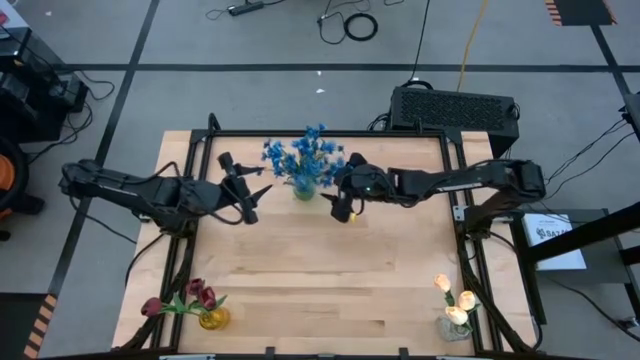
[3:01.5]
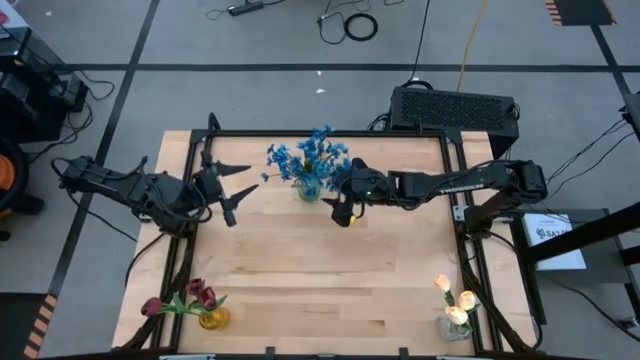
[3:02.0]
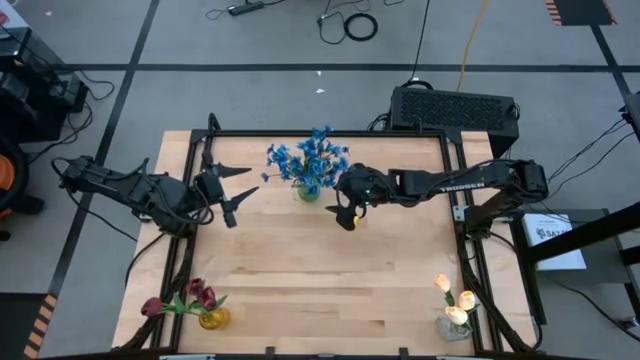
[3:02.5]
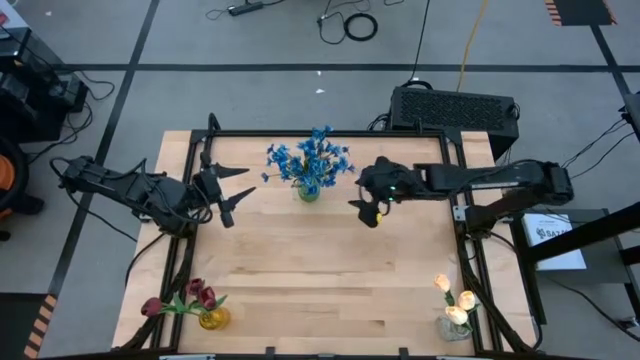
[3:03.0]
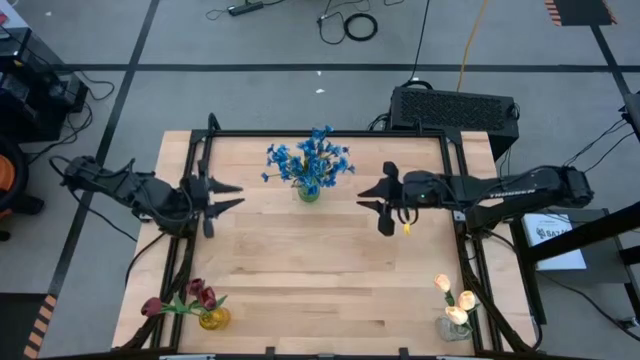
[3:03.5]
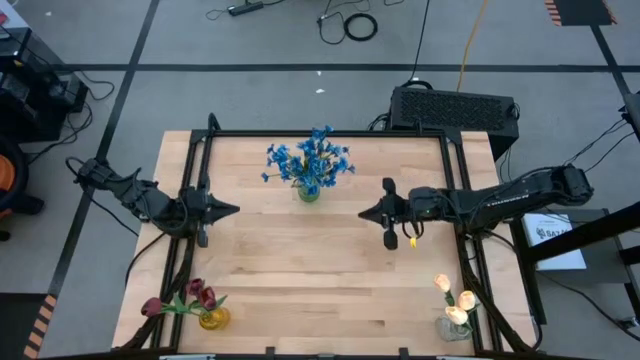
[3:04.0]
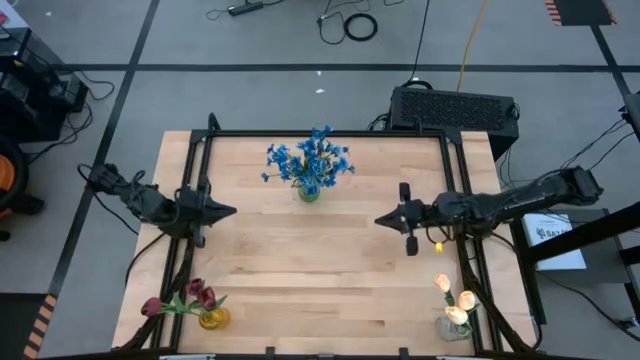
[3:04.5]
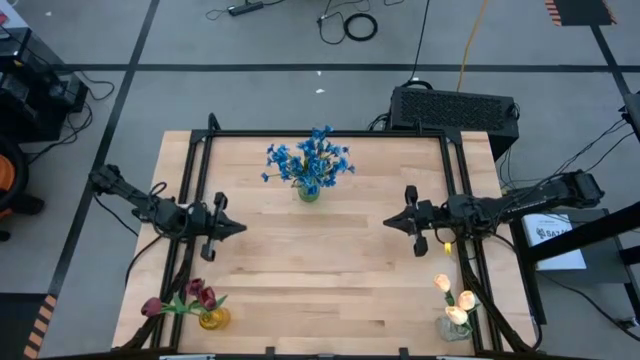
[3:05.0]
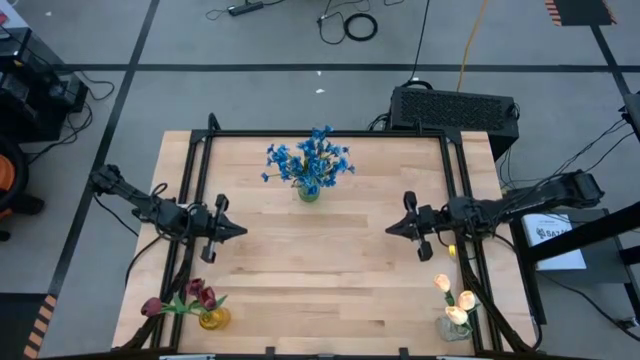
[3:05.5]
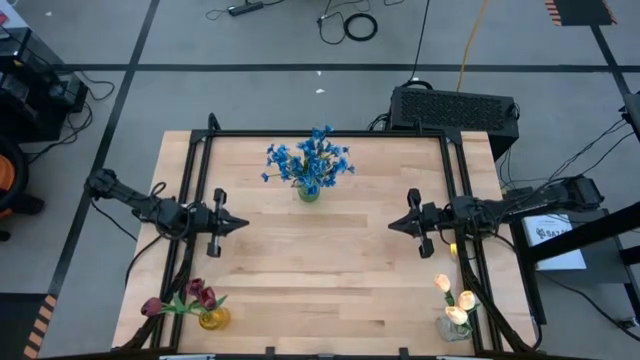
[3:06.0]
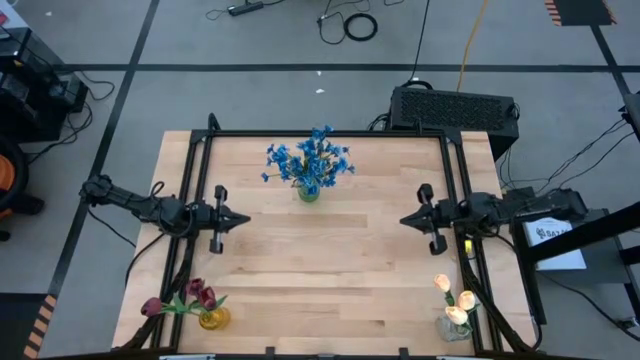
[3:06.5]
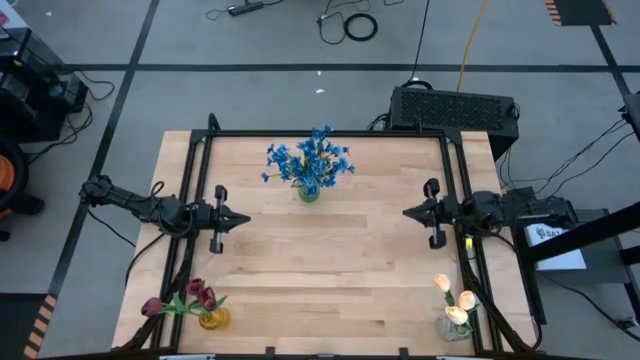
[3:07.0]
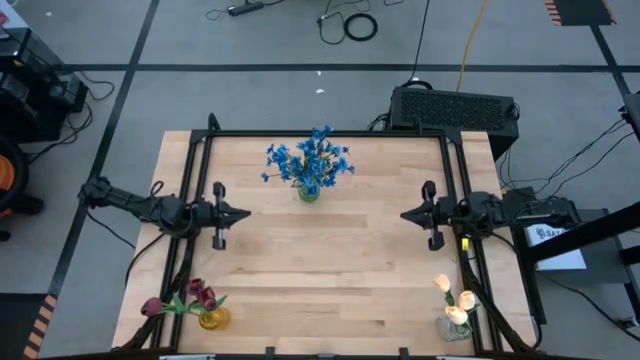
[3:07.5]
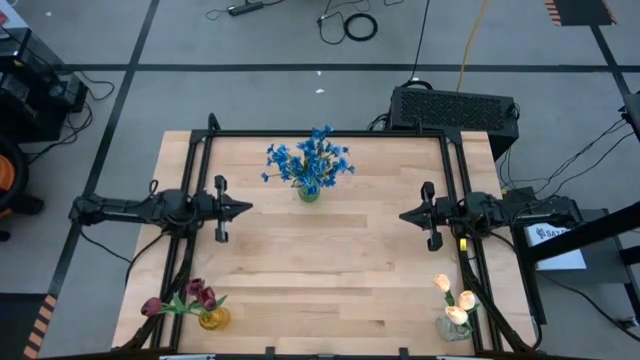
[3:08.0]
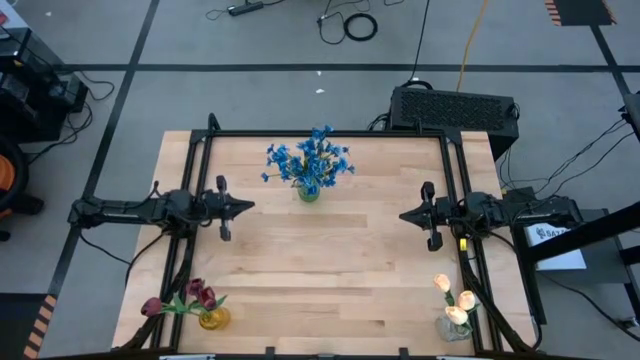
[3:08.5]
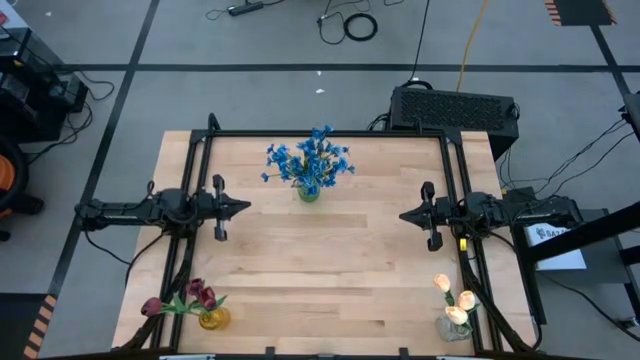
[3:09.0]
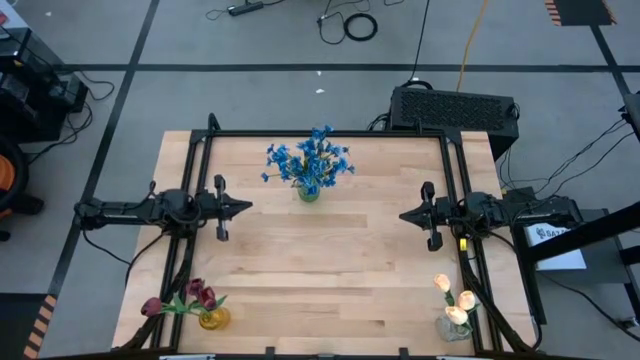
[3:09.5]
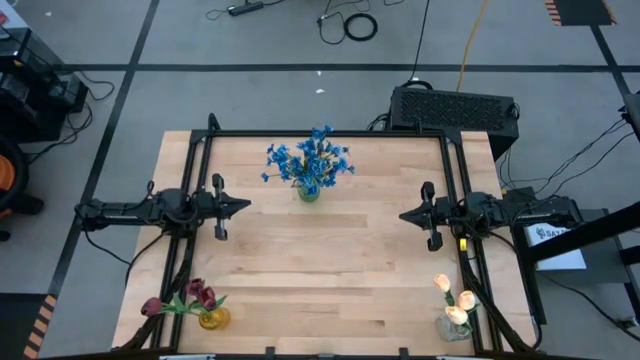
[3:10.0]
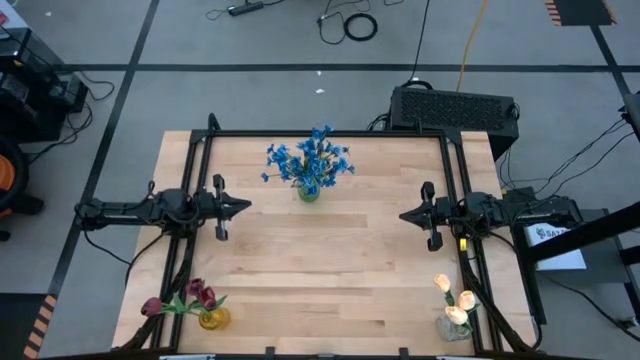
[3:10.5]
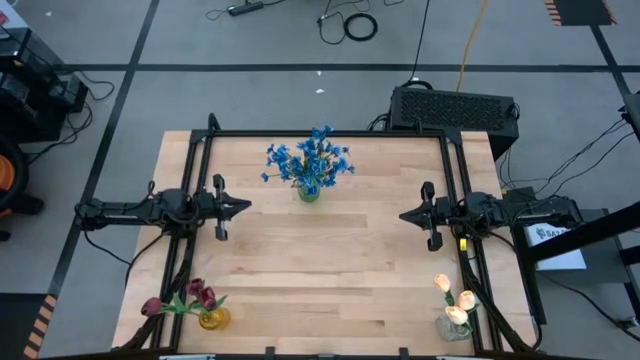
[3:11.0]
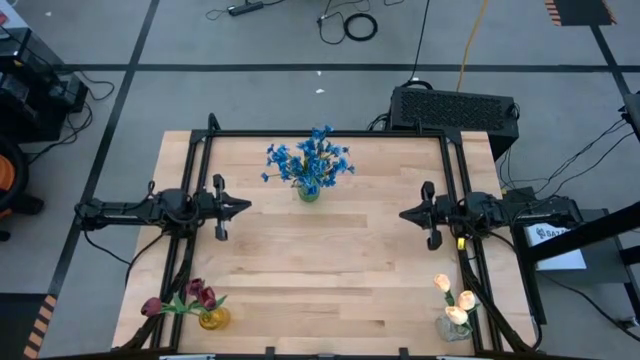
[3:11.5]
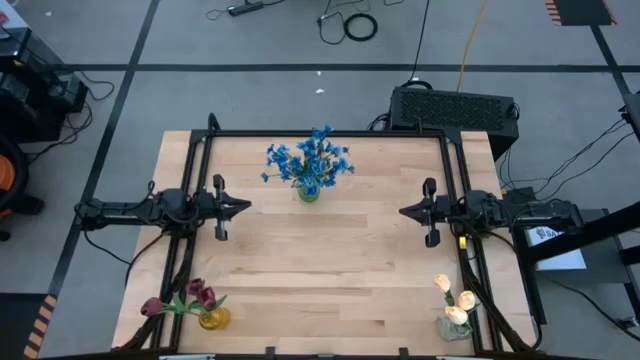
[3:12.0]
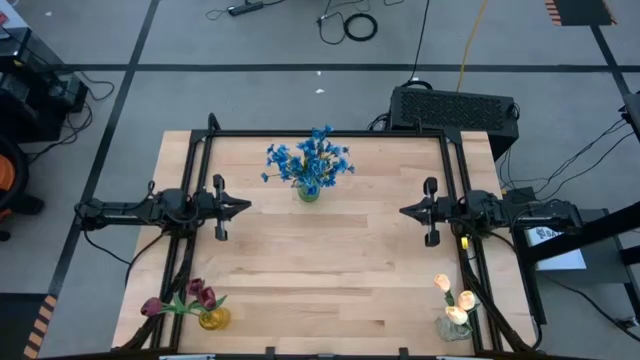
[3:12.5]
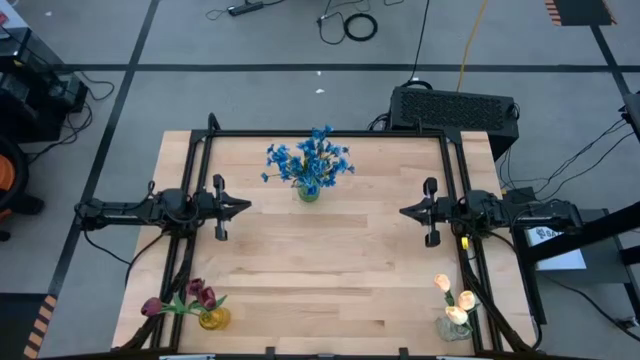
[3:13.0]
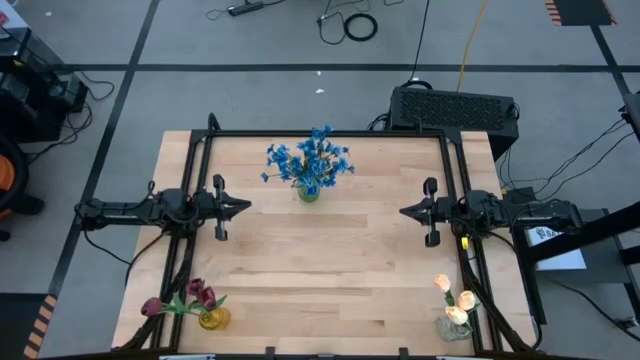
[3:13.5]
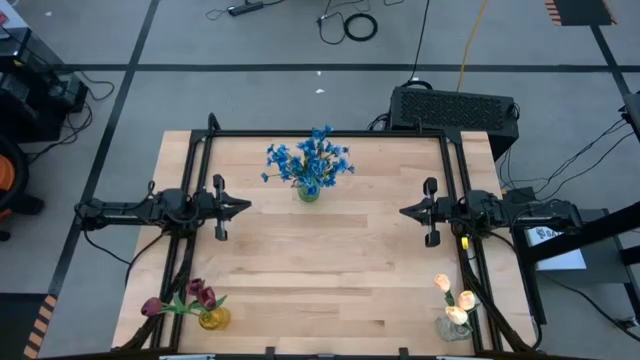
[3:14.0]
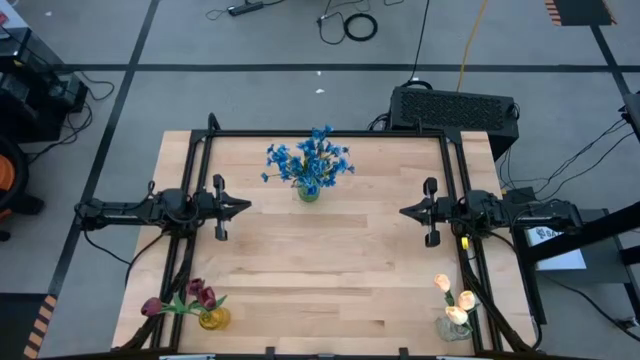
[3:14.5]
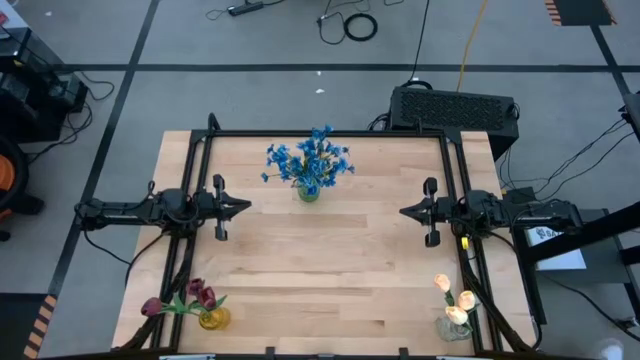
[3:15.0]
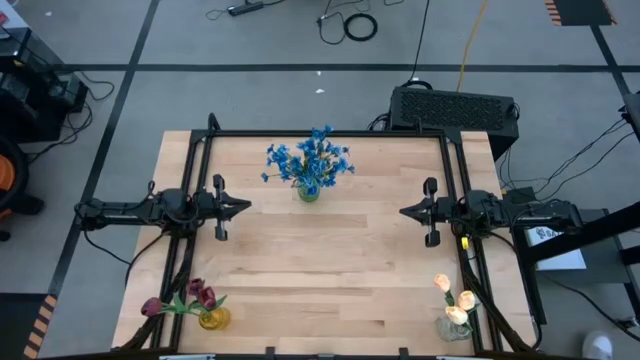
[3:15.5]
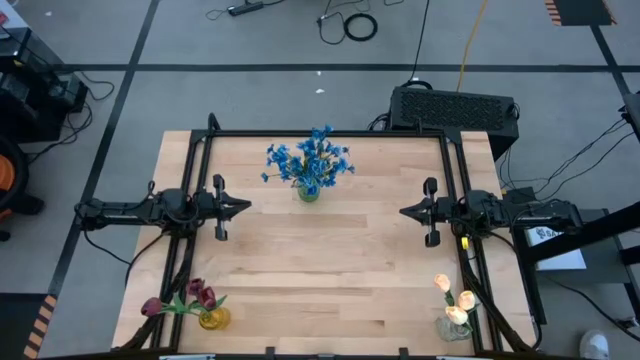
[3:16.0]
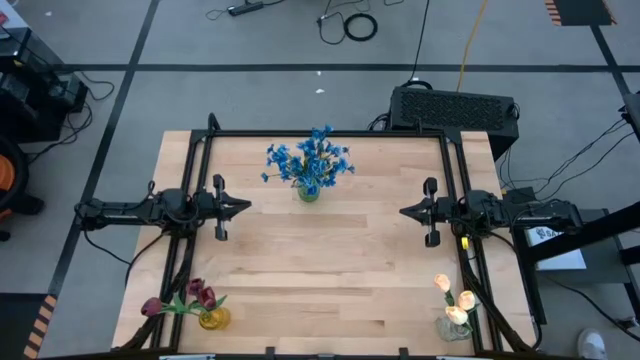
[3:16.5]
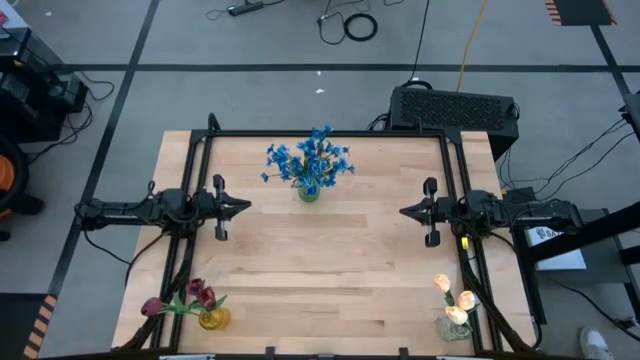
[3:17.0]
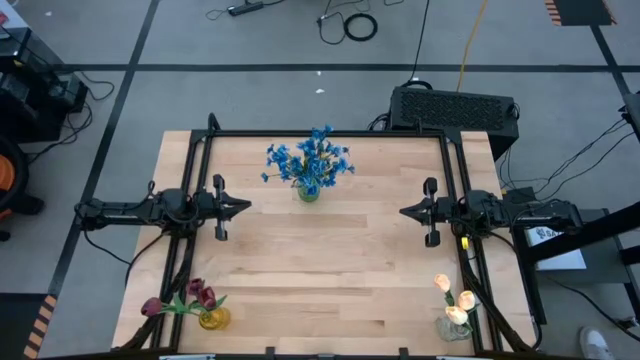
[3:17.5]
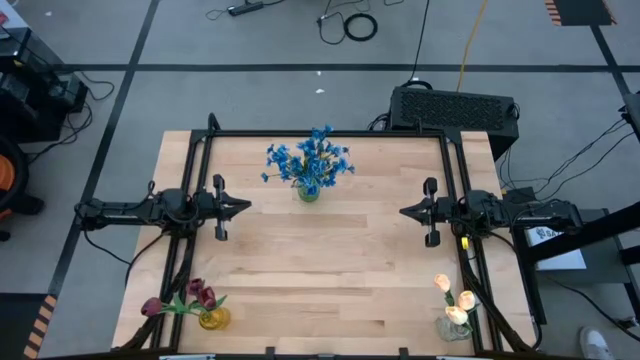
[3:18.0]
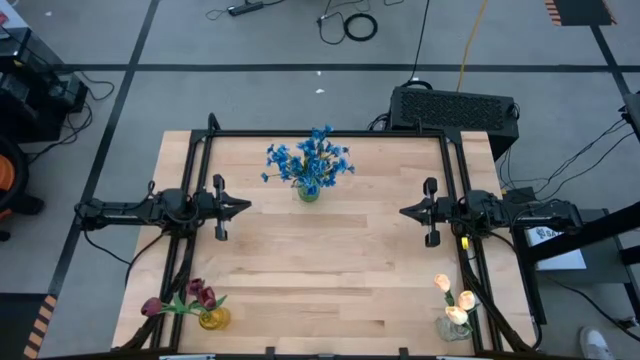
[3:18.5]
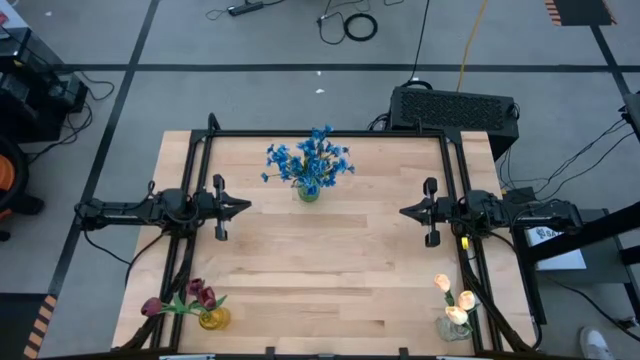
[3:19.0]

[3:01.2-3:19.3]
Task: Sort flowers into vase by color
Return to Home Position

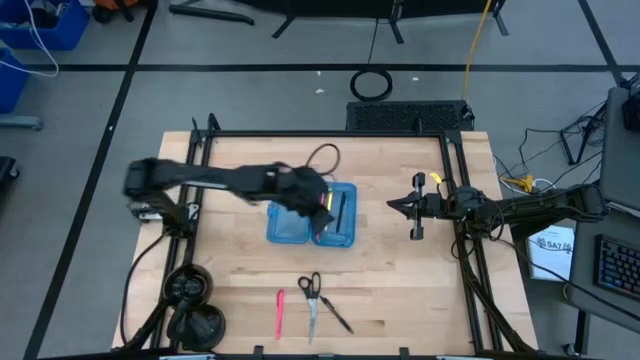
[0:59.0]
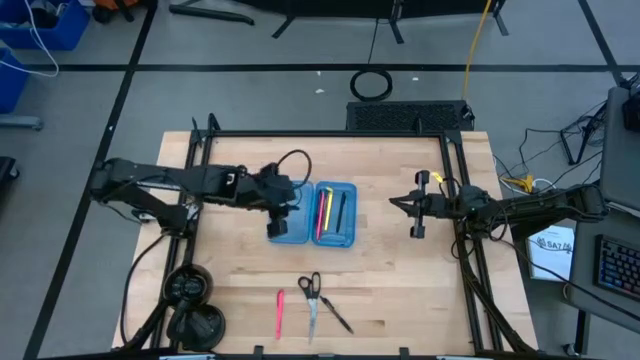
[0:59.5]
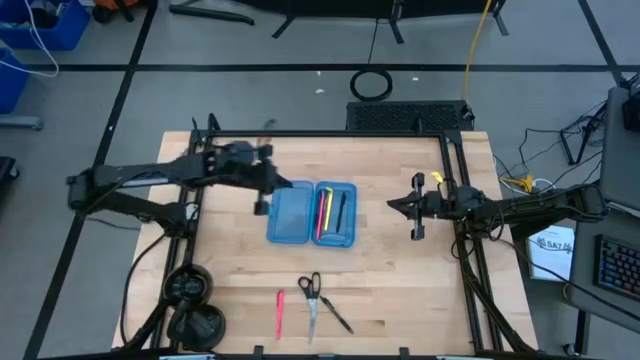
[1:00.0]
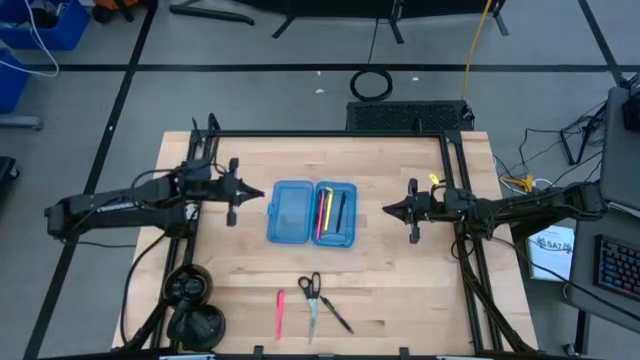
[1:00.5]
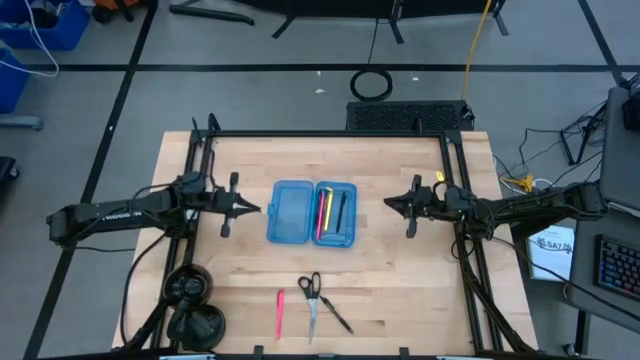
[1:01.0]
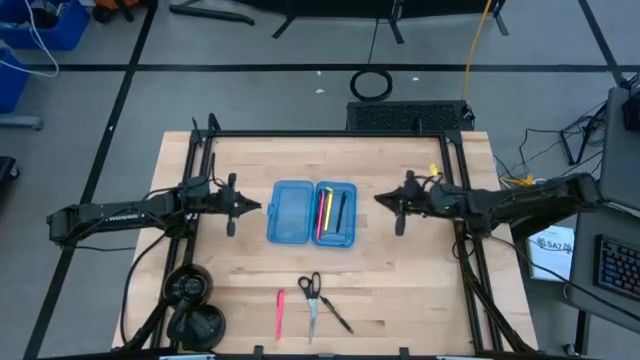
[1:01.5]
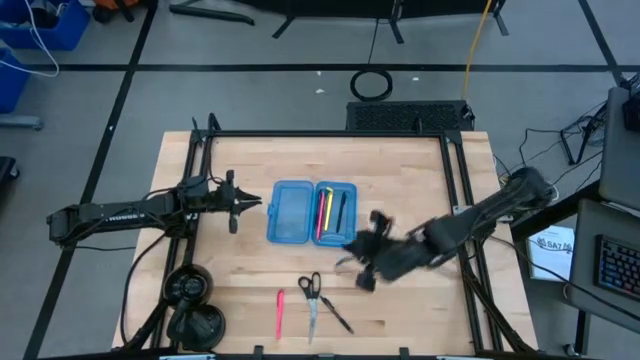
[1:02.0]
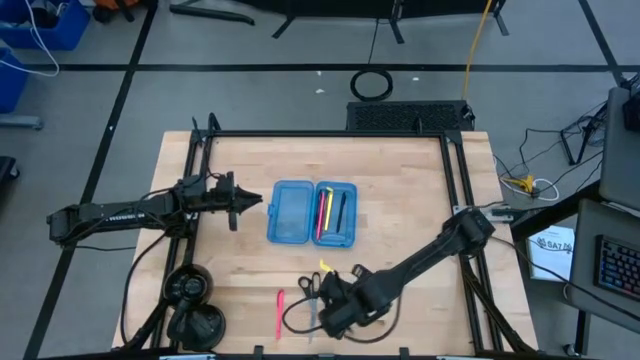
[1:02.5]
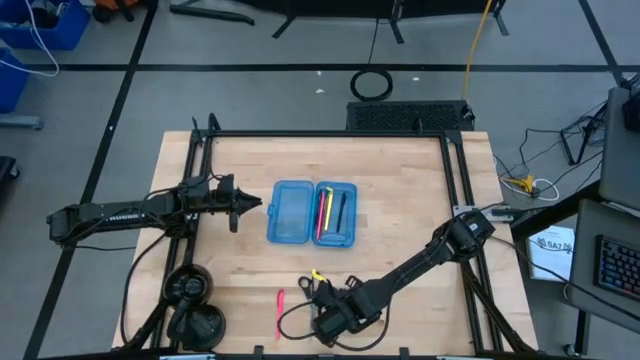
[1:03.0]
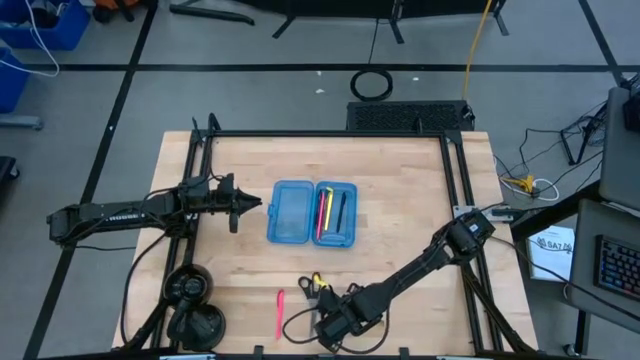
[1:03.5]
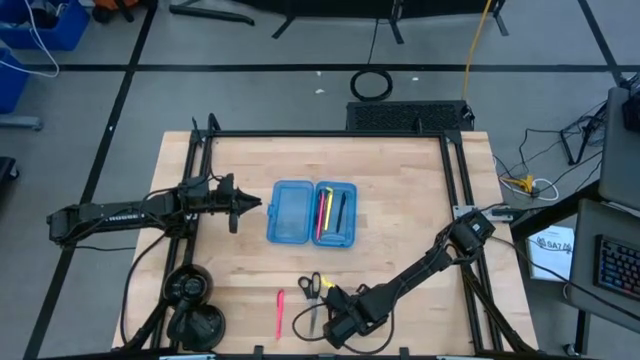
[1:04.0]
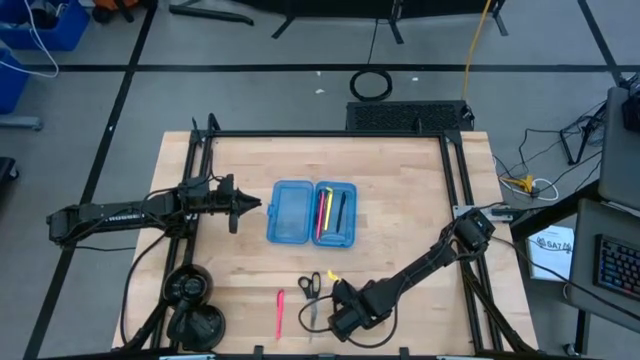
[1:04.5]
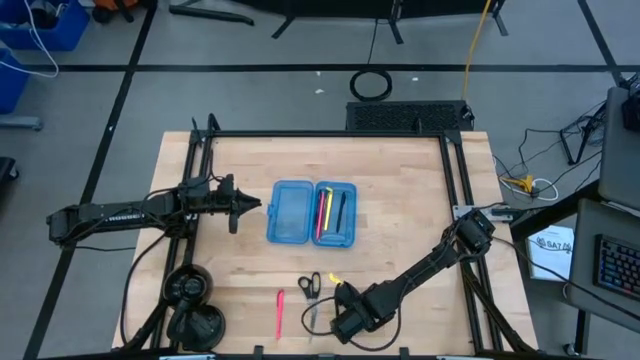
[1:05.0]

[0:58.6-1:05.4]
Task: Pick & place school supplies into a supply box
Put the black pen into the blue supply box
